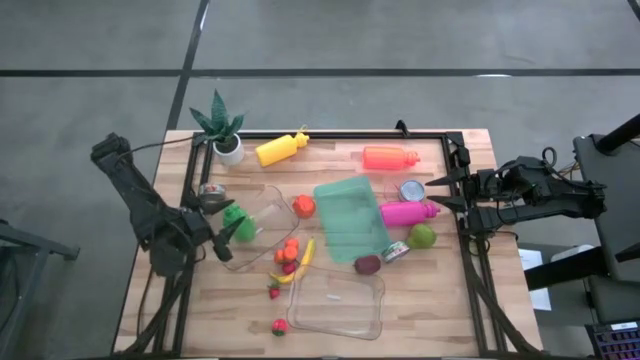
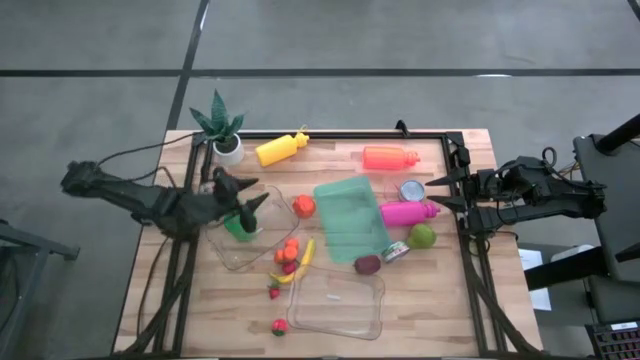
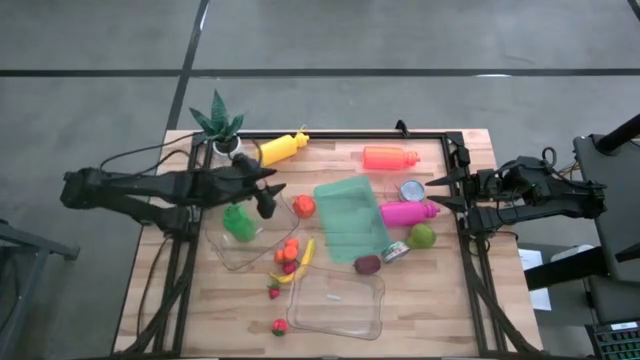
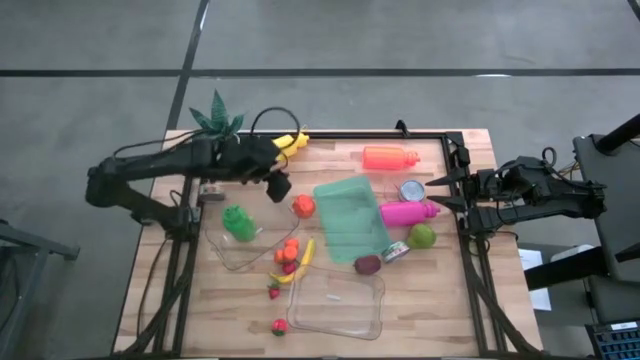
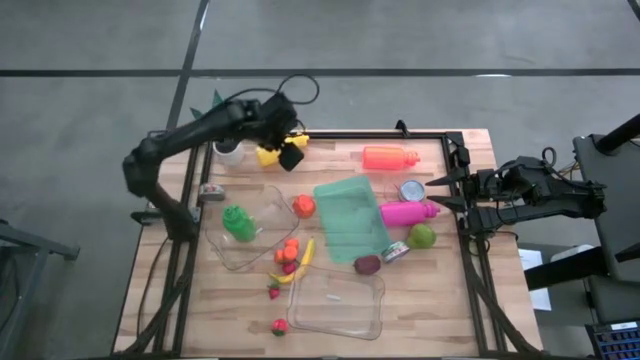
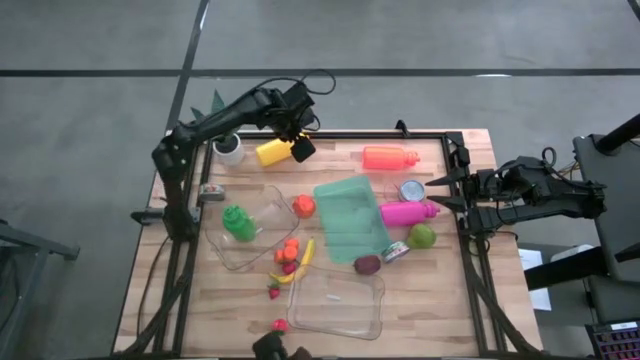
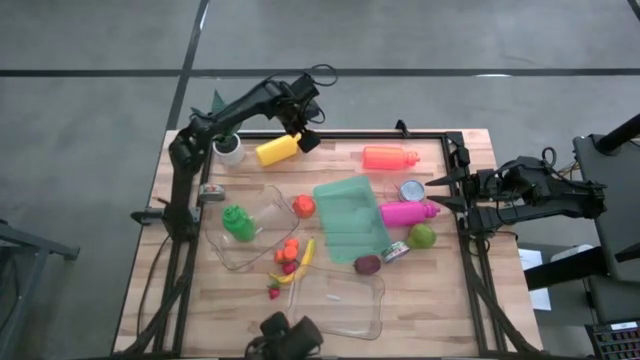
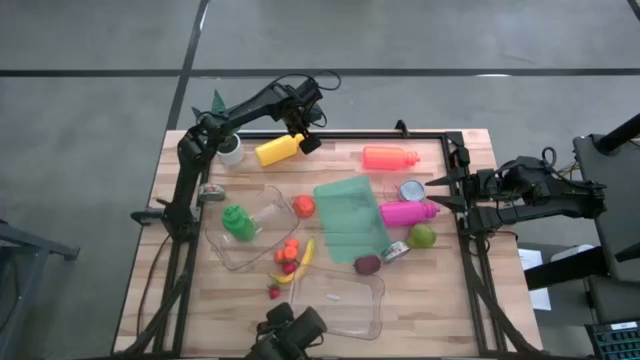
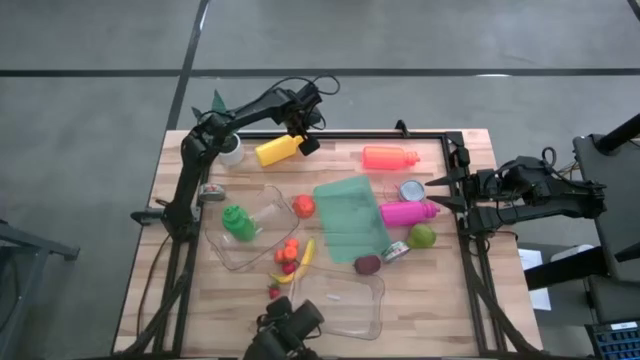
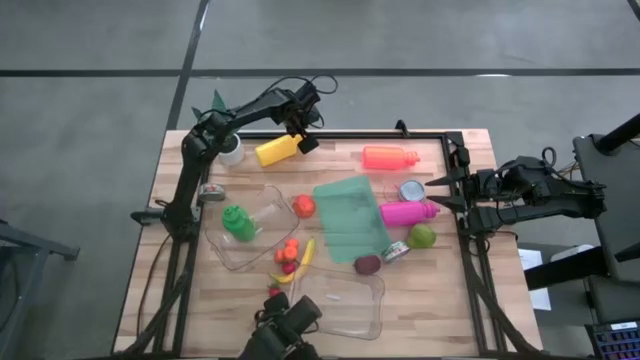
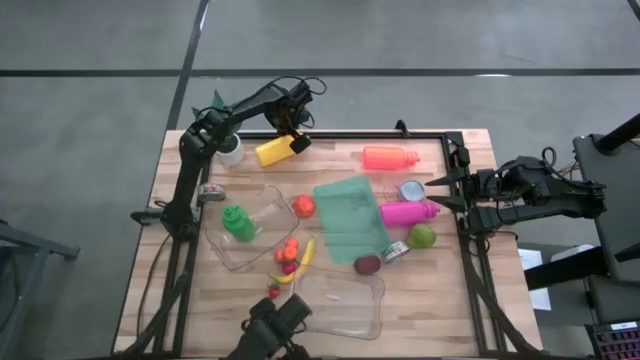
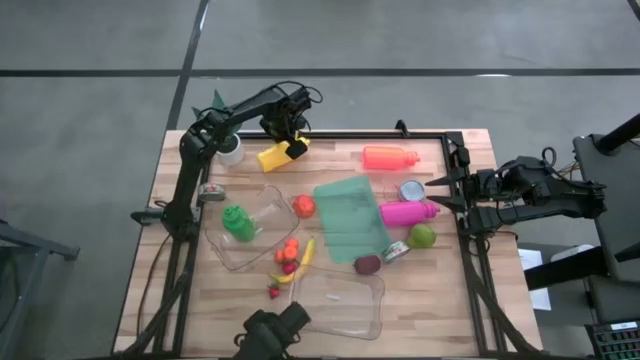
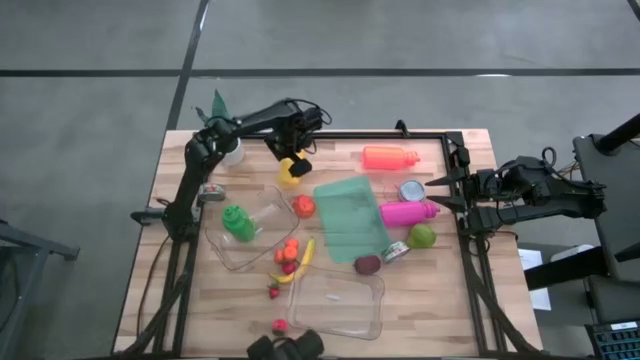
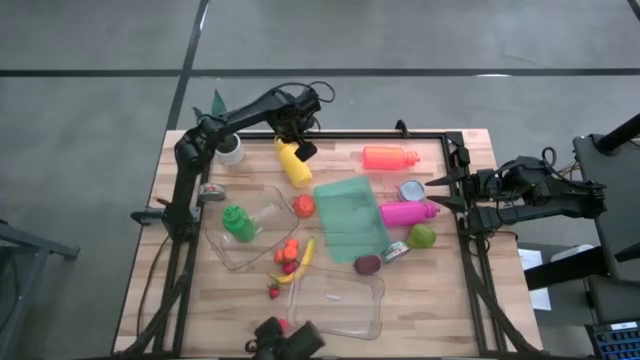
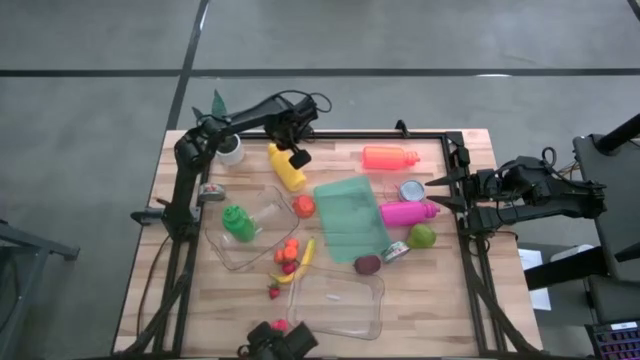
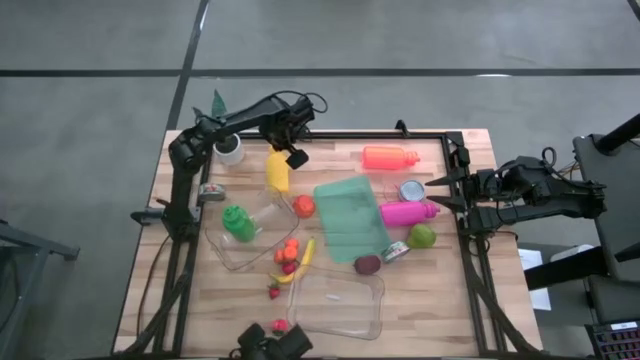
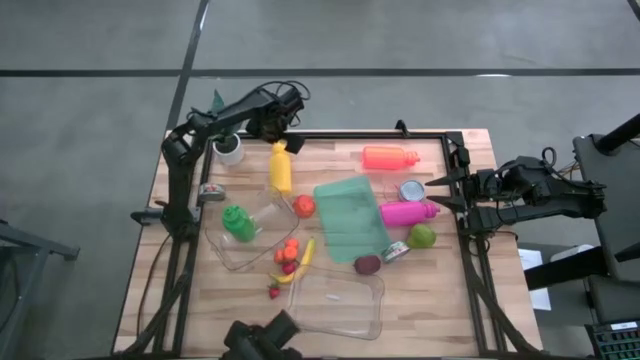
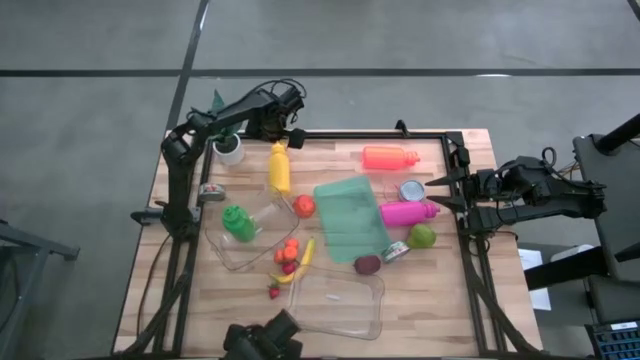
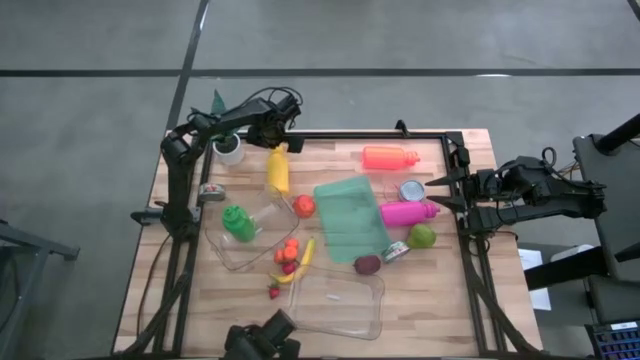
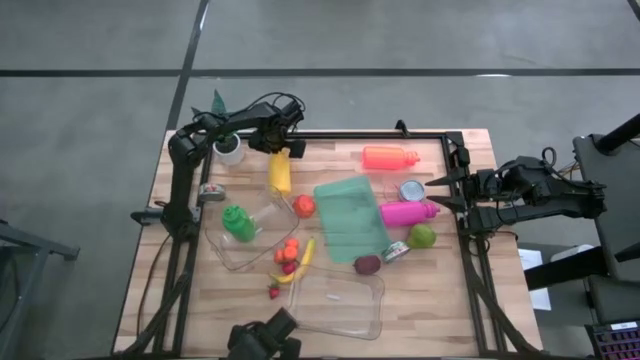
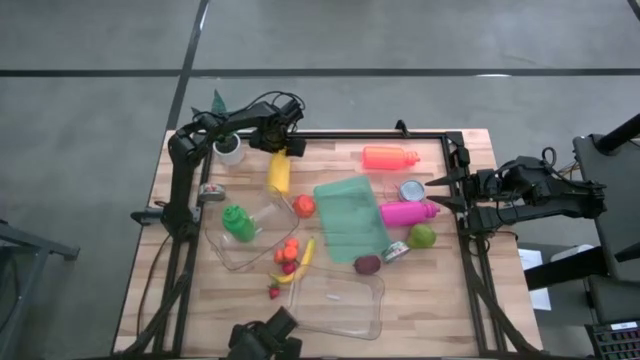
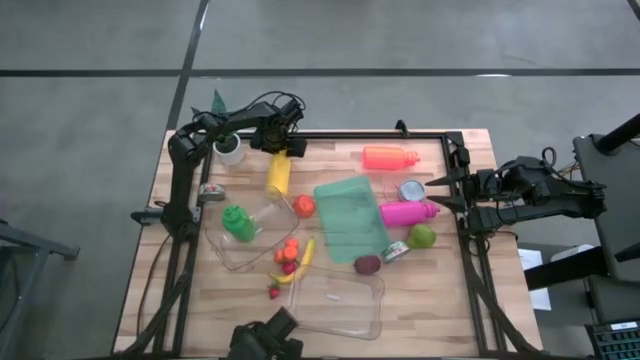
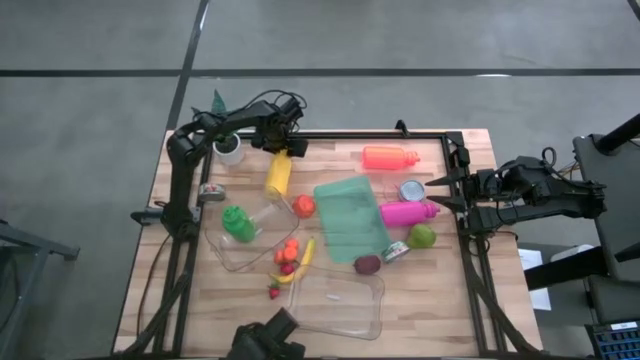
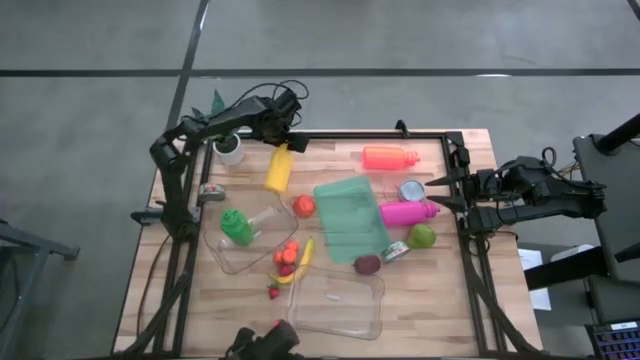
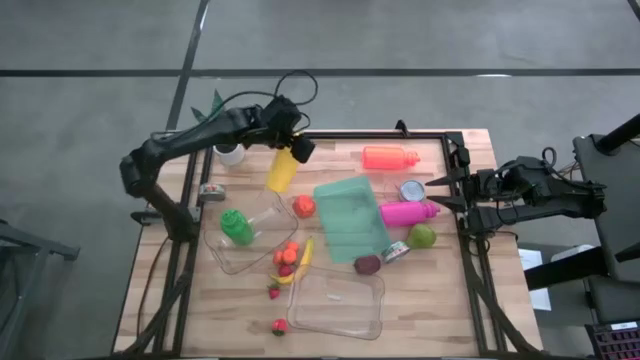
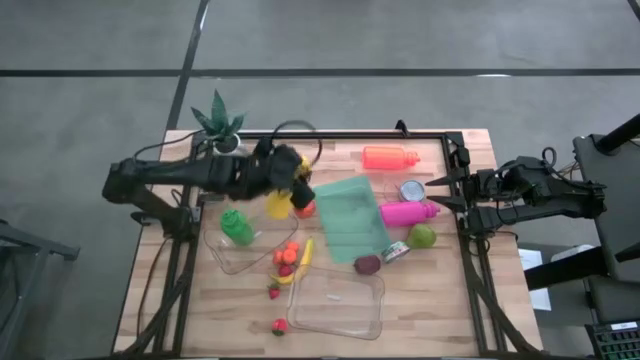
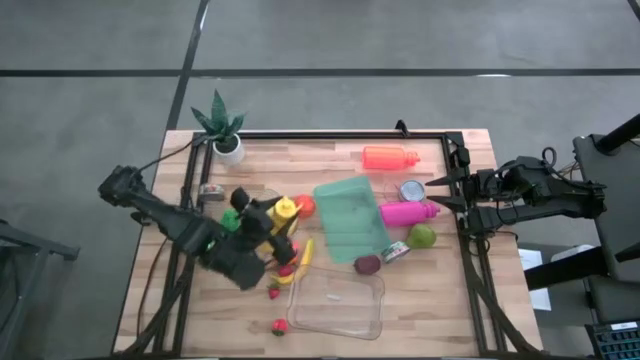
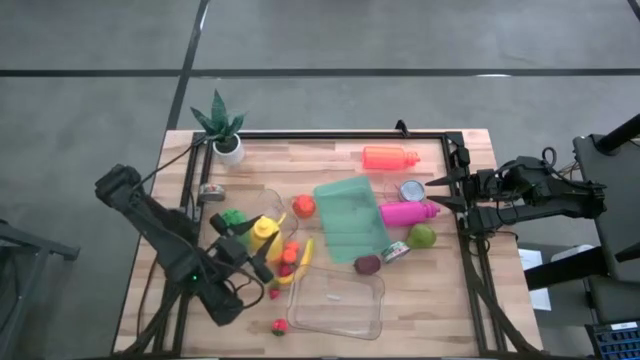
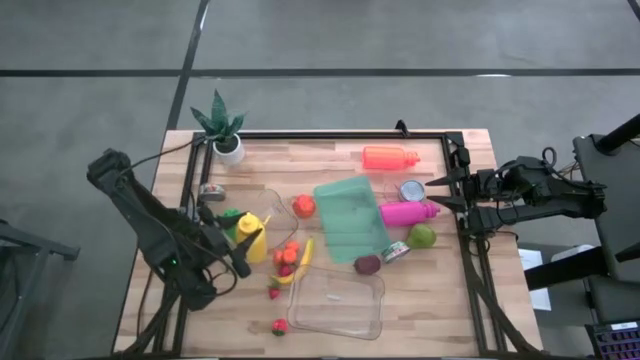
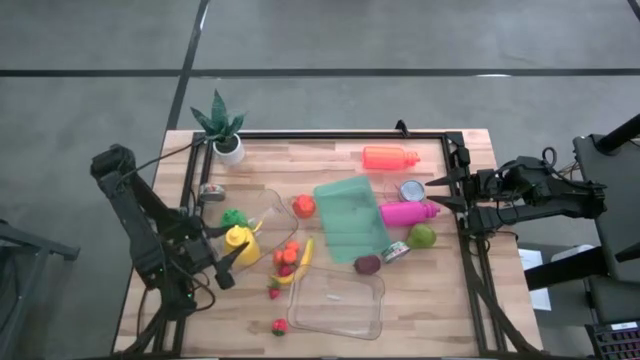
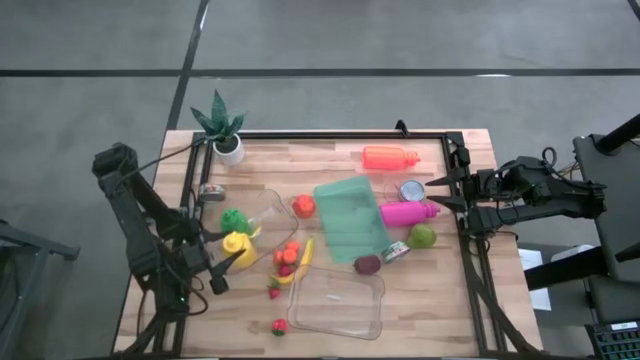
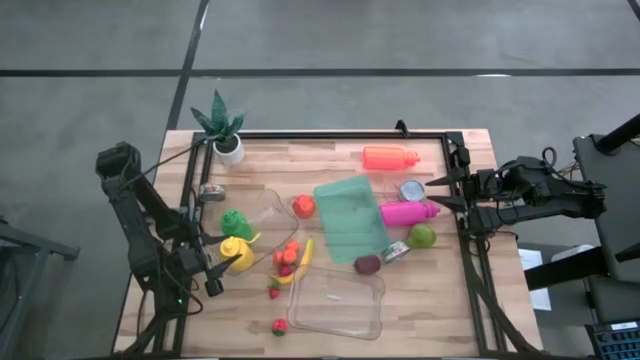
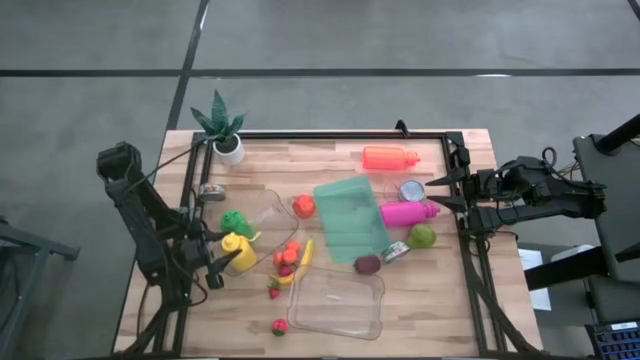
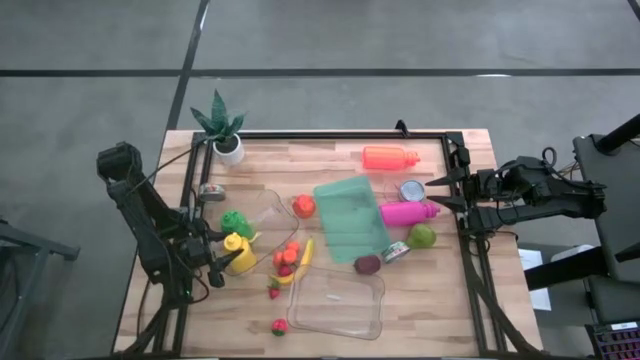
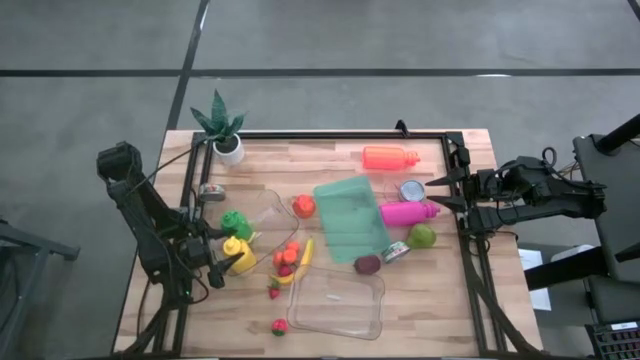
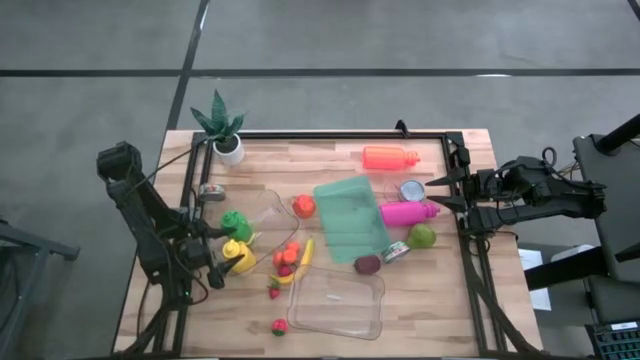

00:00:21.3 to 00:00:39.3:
Task: Pick & Place Food Item
Put the yellow water bottle into the top transparent bin

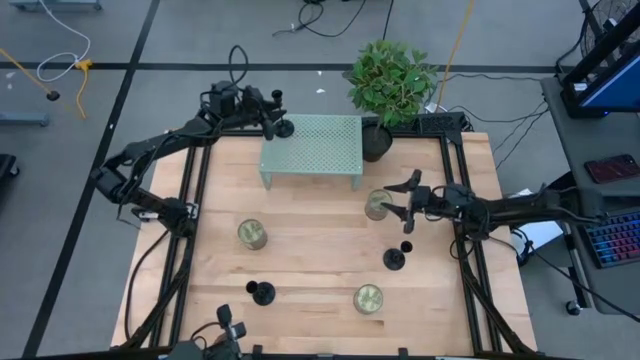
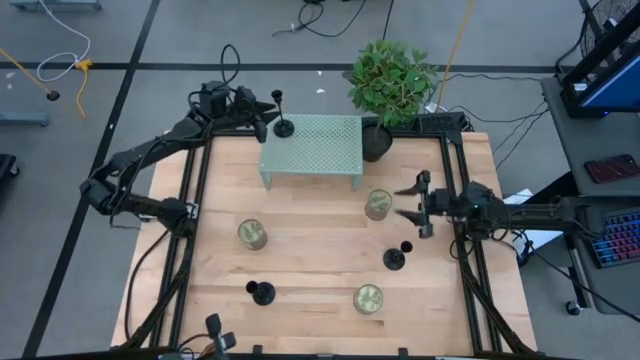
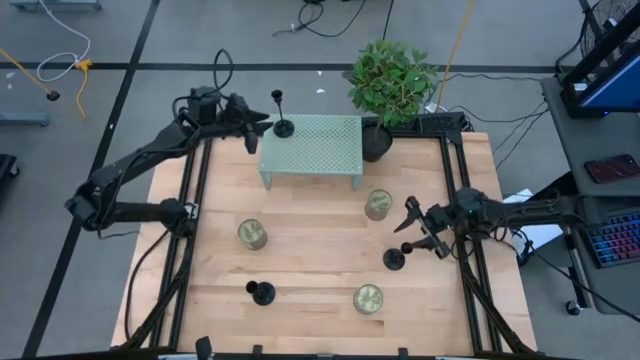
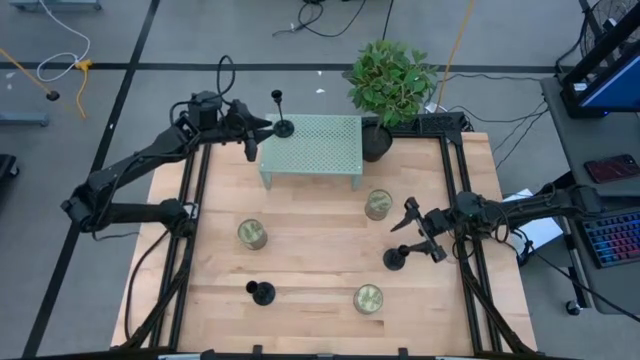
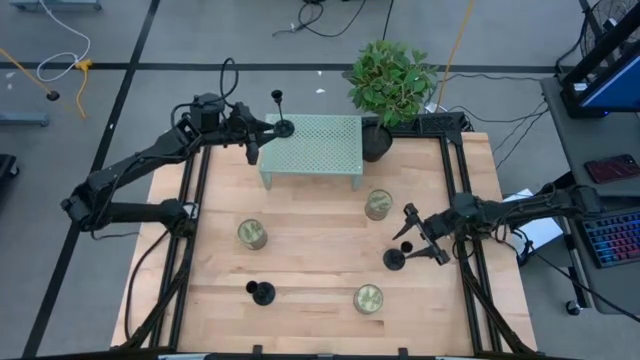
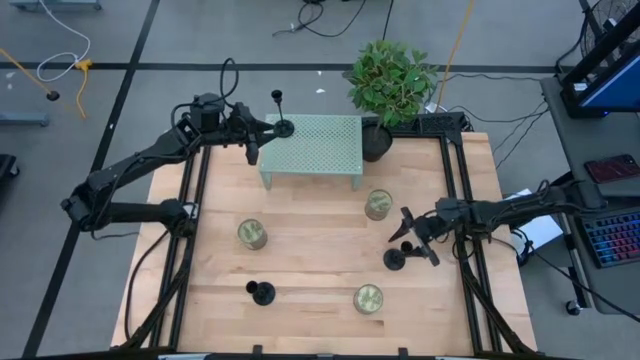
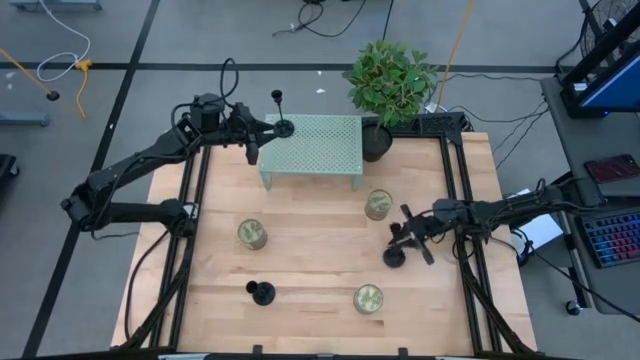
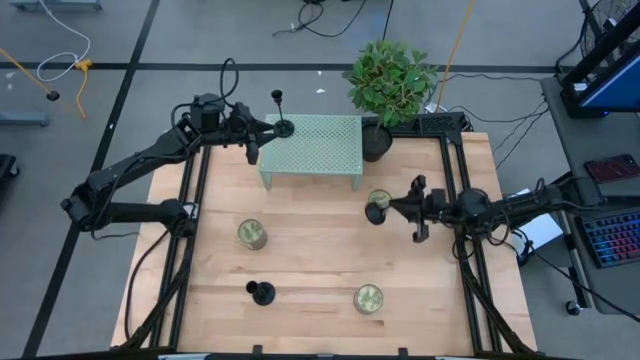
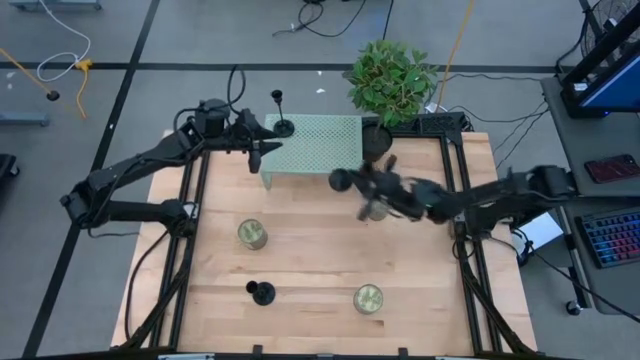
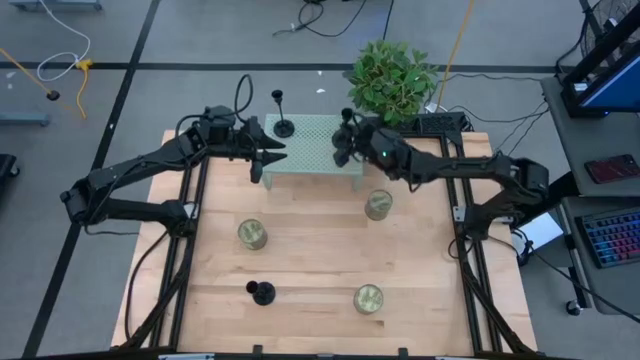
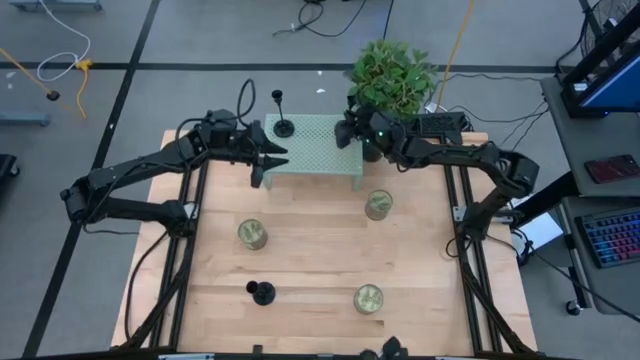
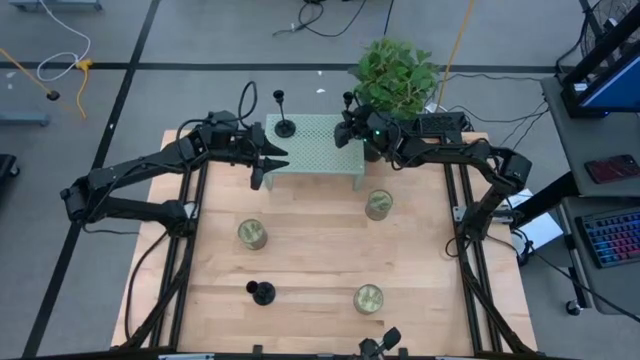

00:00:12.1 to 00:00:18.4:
Task: Pick & Place candle stick holders
Put the top candle holder on the shelf
